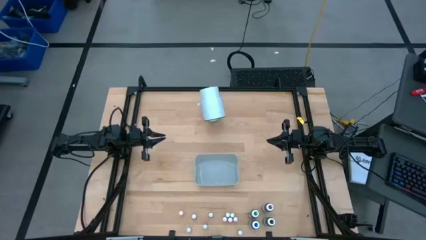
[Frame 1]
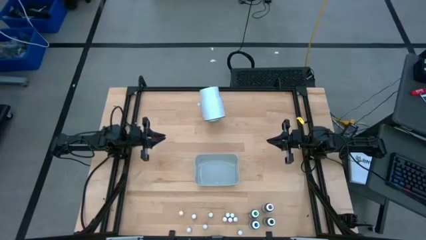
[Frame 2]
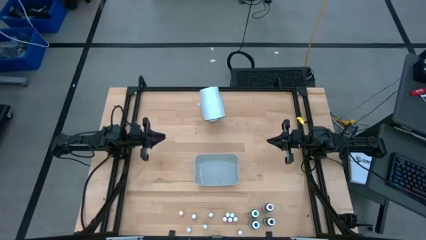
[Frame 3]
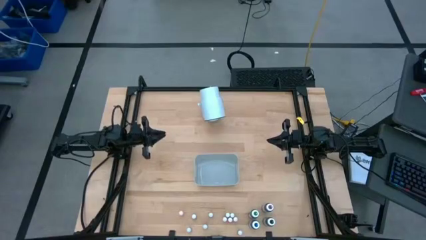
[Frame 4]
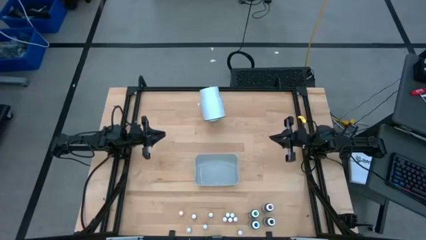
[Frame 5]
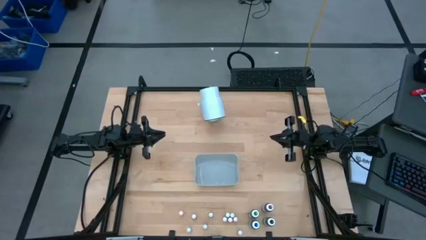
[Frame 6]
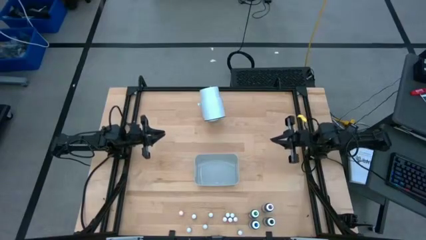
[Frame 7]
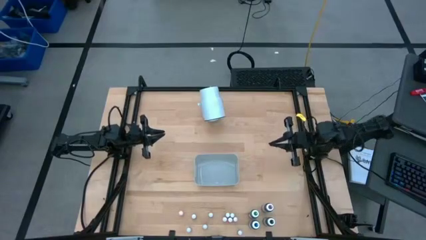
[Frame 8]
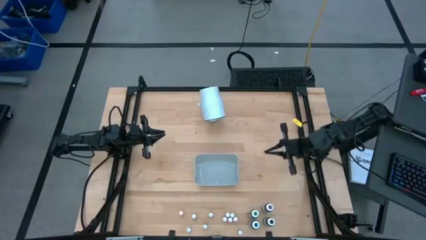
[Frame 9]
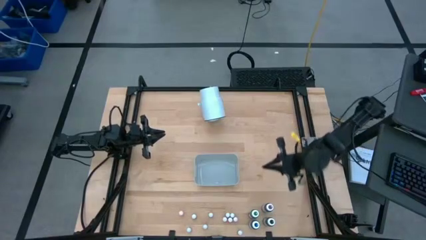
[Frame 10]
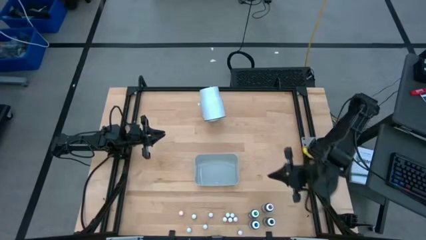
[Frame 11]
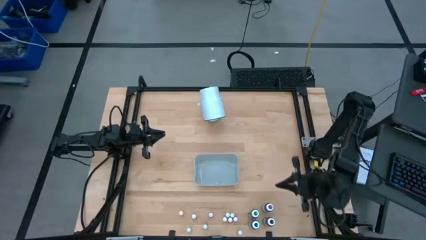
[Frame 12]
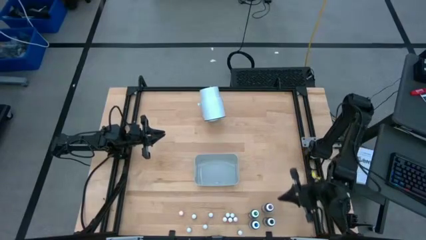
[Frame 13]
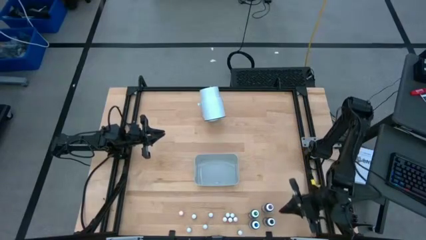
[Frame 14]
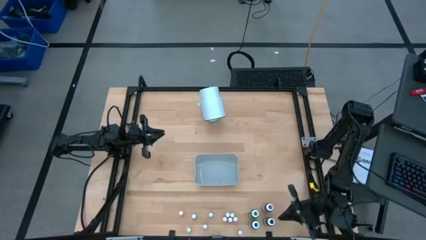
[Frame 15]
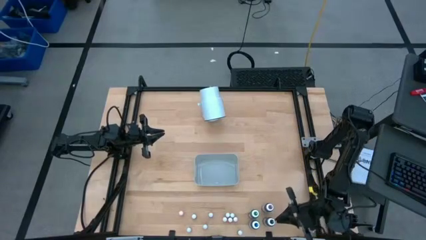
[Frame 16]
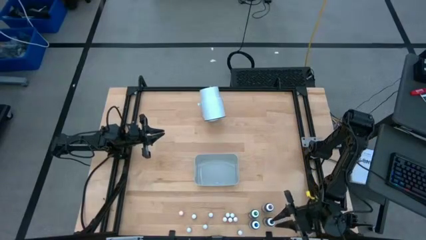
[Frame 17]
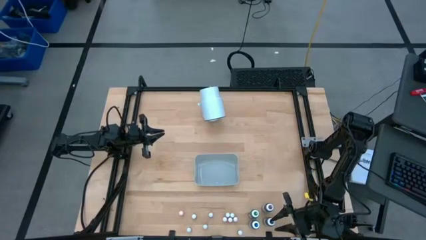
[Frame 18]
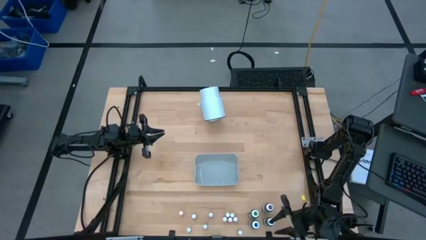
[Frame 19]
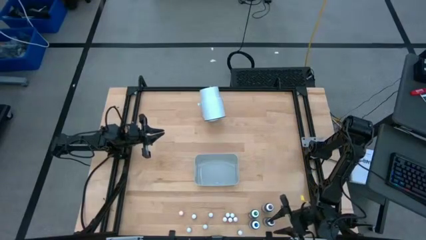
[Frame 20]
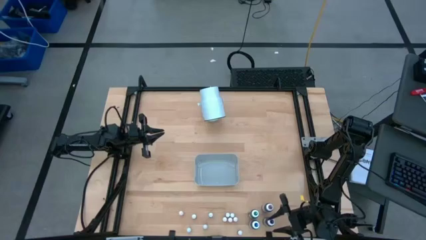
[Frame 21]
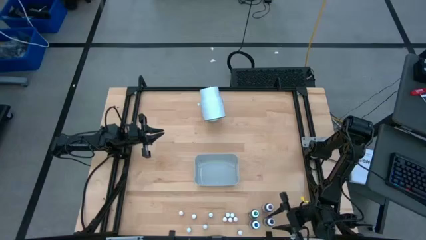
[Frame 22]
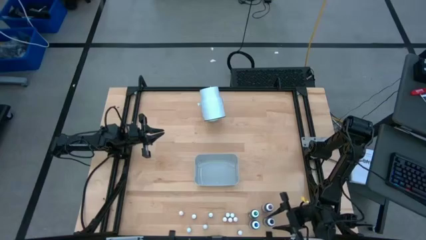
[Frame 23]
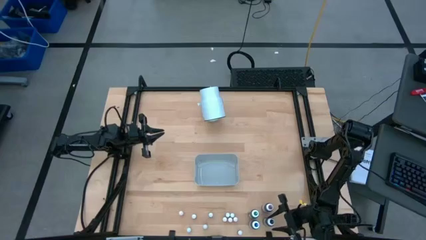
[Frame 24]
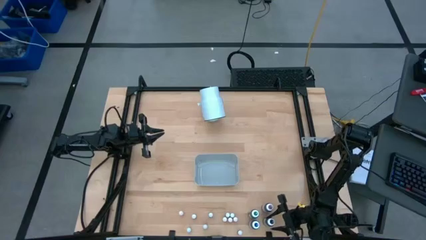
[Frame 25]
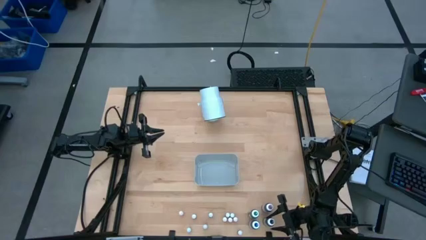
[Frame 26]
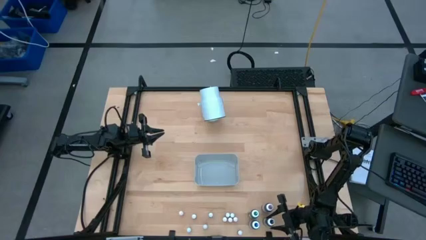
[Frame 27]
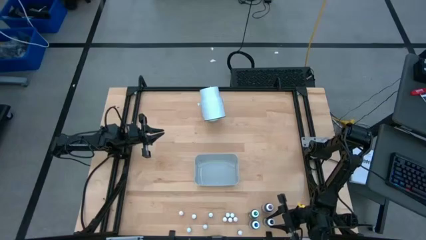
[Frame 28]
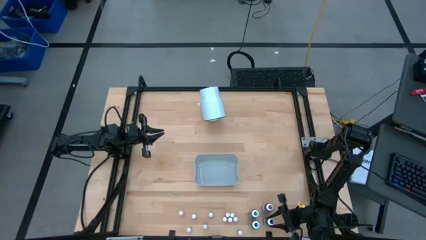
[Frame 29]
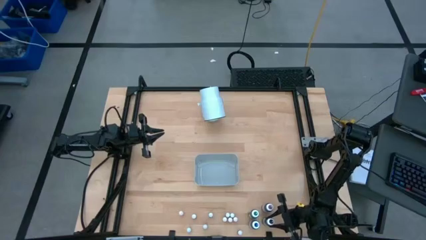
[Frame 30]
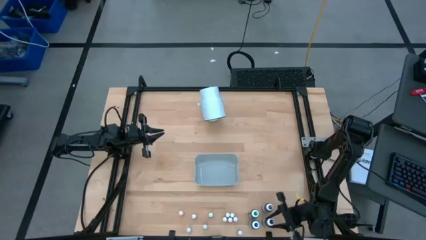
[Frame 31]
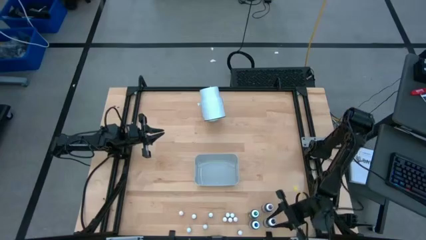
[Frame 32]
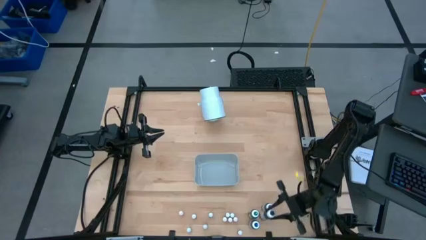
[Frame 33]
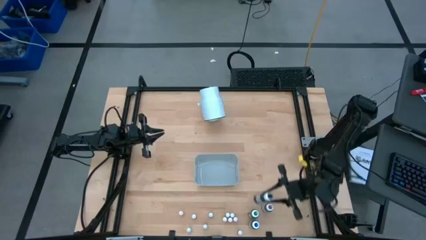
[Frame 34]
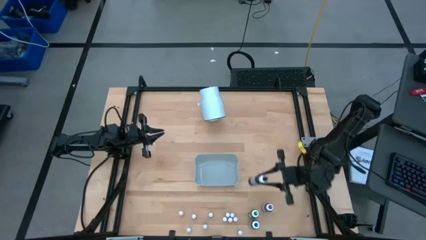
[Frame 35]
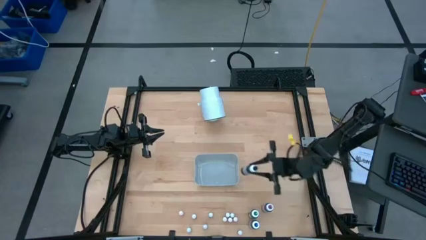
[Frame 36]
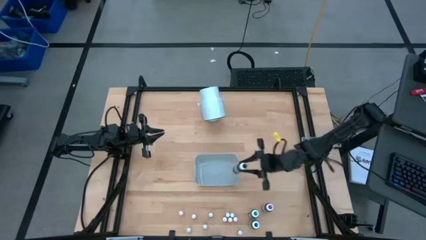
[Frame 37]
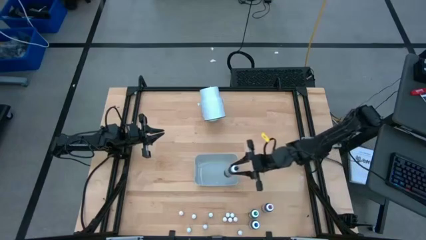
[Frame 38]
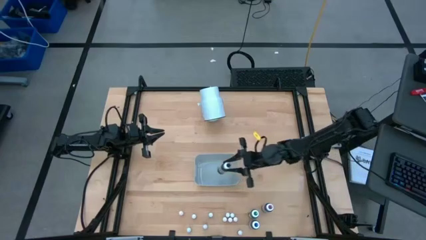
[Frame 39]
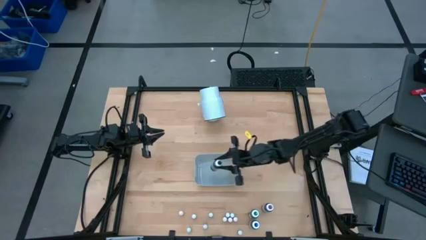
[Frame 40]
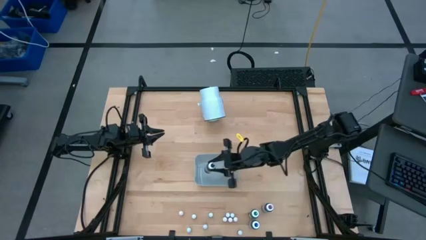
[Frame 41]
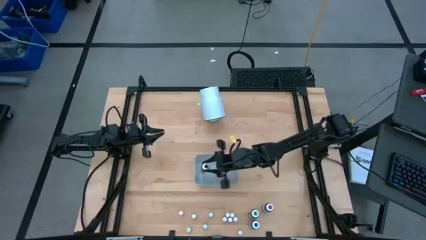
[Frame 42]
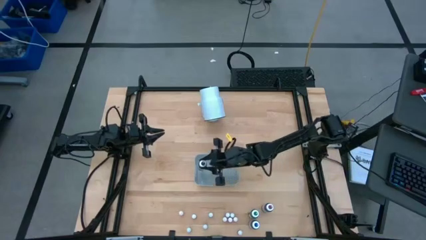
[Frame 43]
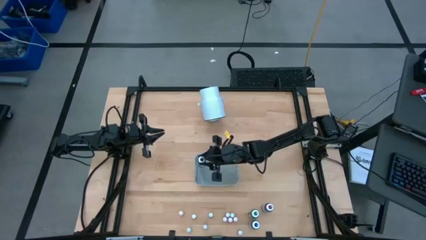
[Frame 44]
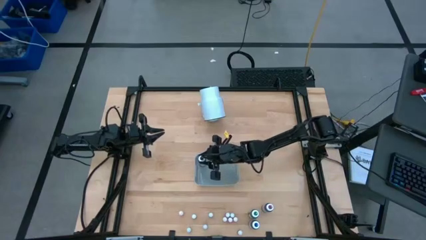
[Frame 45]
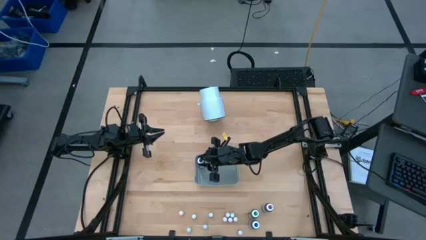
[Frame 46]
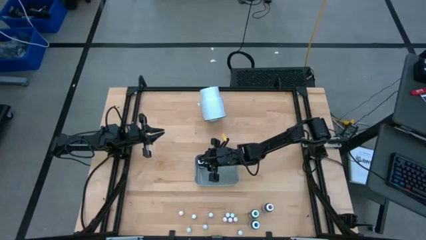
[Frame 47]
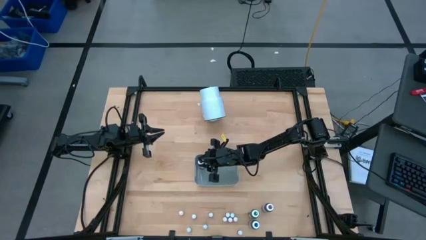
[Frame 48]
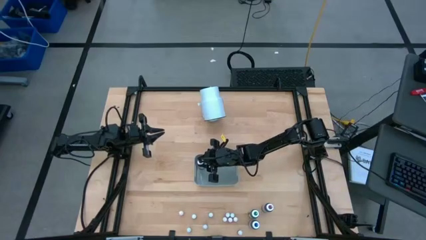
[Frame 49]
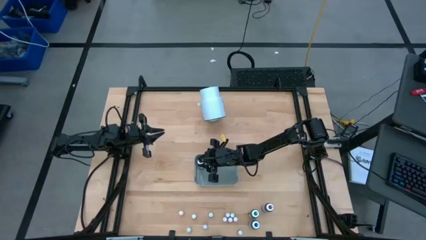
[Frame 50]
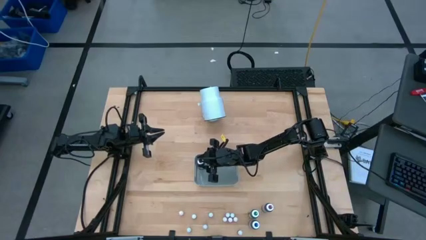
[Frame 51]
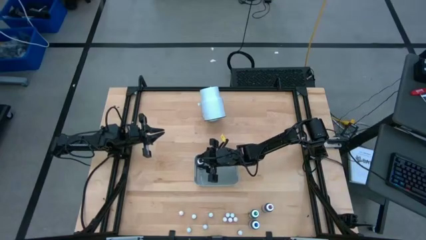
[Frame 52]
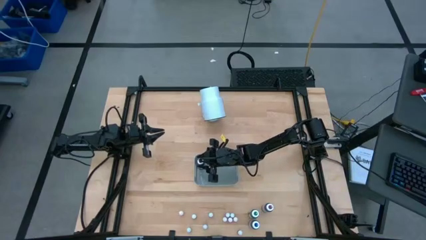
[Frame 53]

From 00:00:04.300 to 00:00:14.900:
Task: Pick & Place food coloring
Put the big black food coloring bottle into the gray bin
